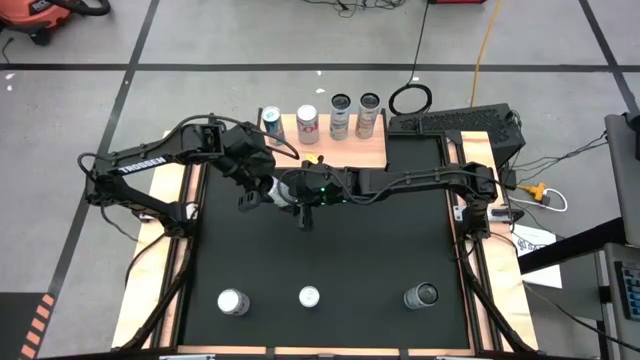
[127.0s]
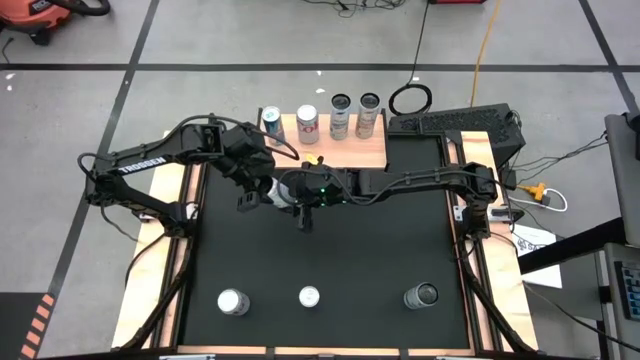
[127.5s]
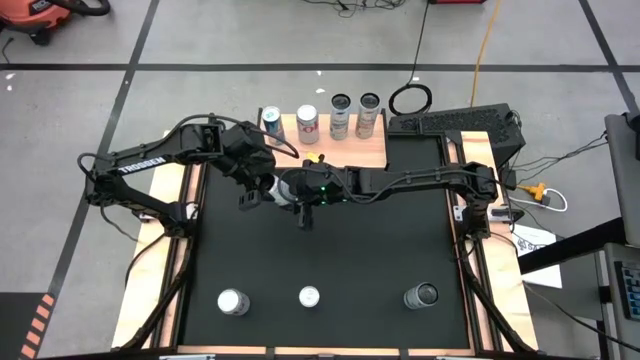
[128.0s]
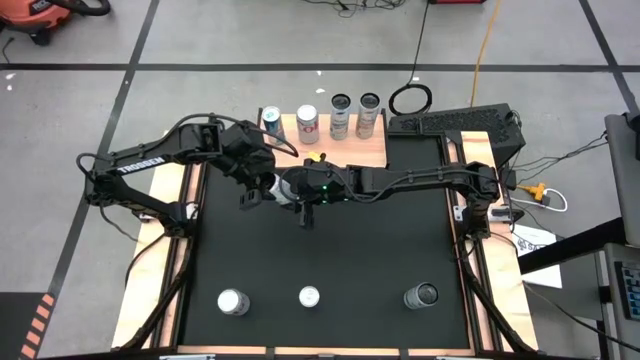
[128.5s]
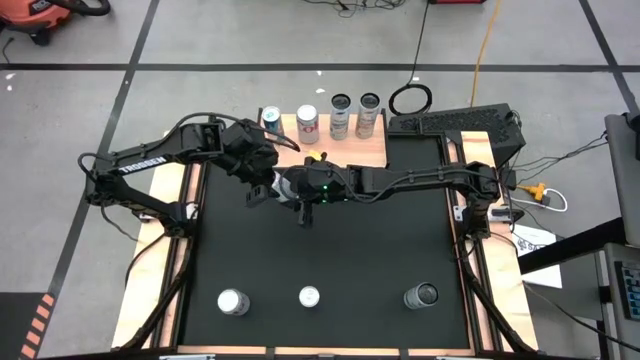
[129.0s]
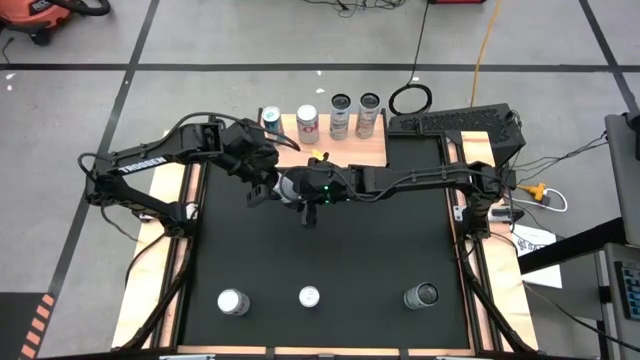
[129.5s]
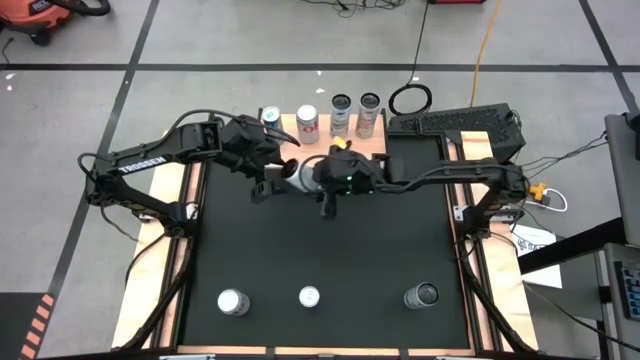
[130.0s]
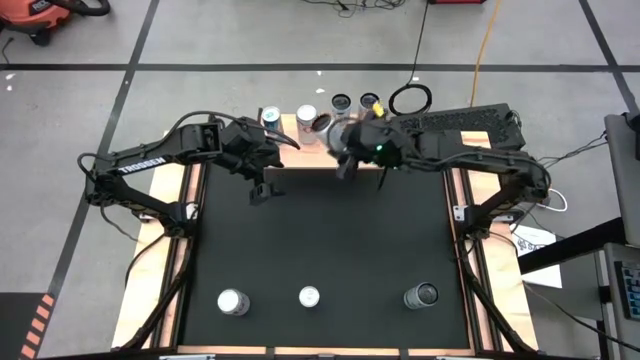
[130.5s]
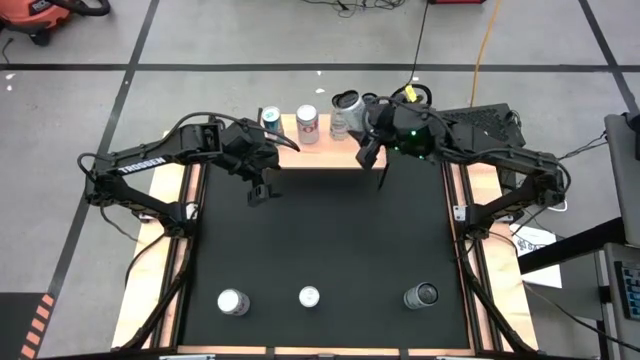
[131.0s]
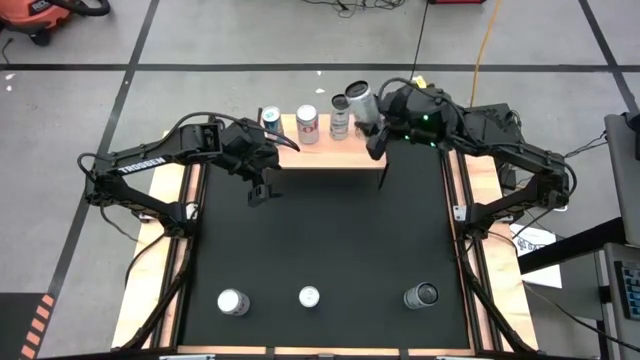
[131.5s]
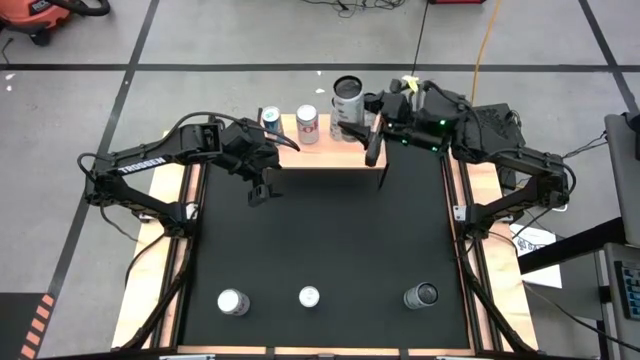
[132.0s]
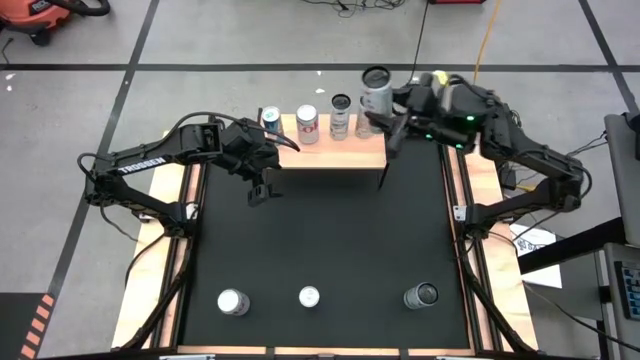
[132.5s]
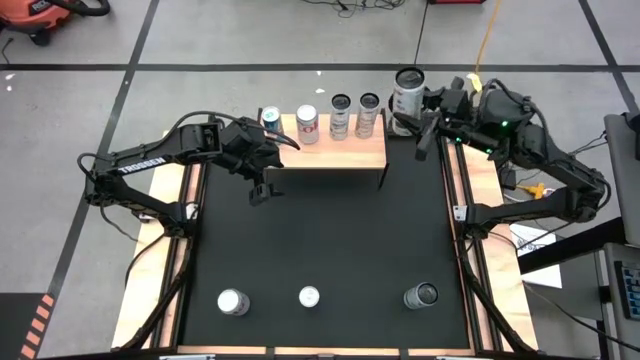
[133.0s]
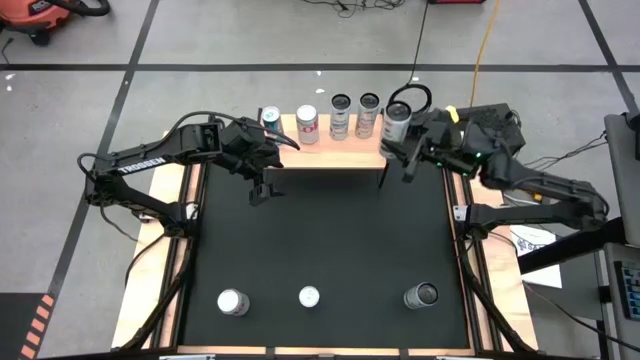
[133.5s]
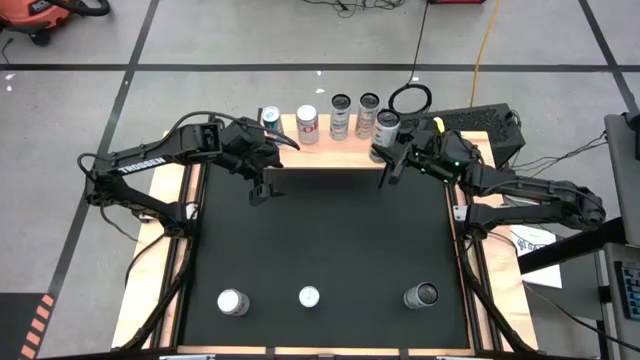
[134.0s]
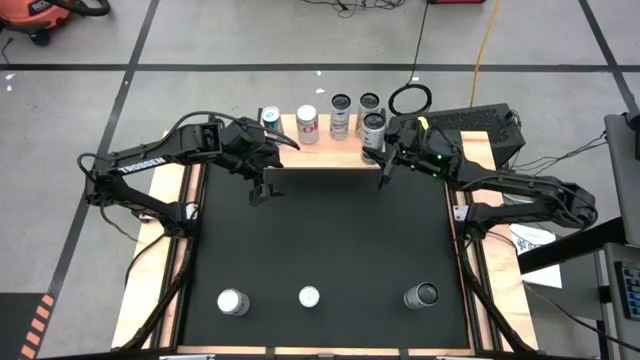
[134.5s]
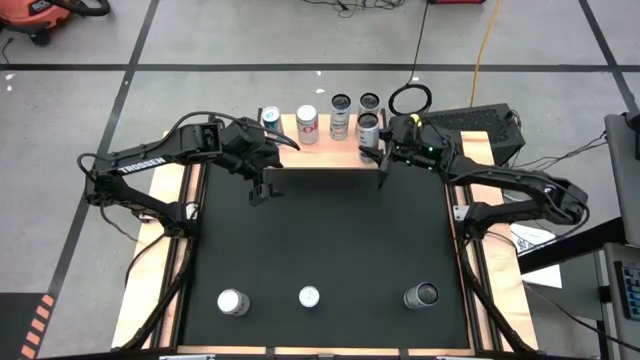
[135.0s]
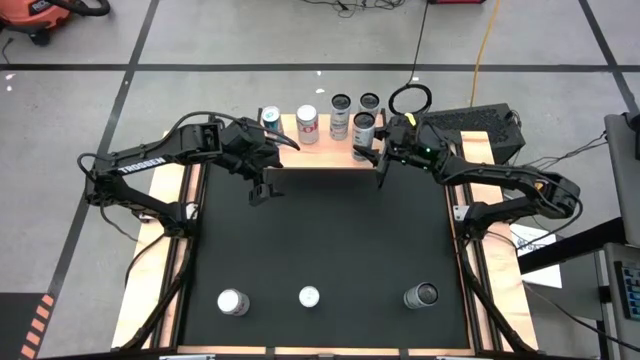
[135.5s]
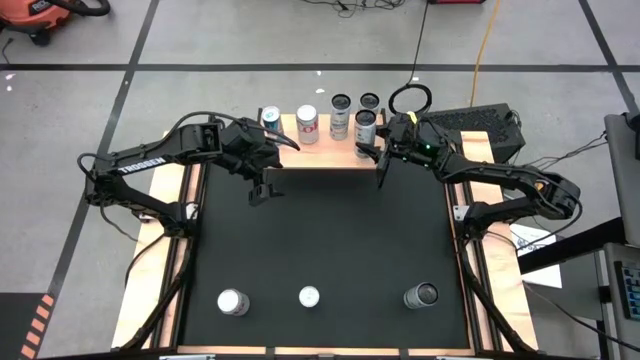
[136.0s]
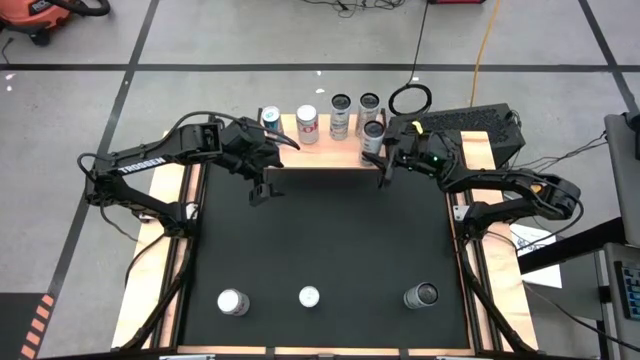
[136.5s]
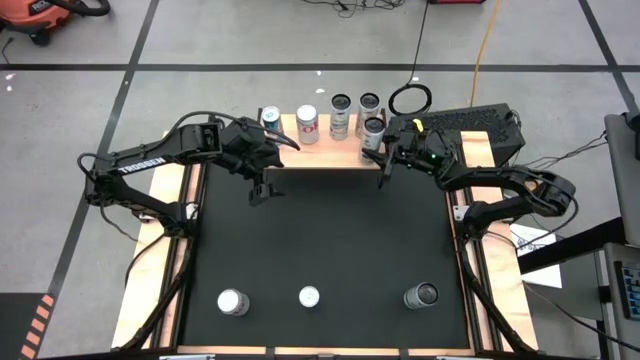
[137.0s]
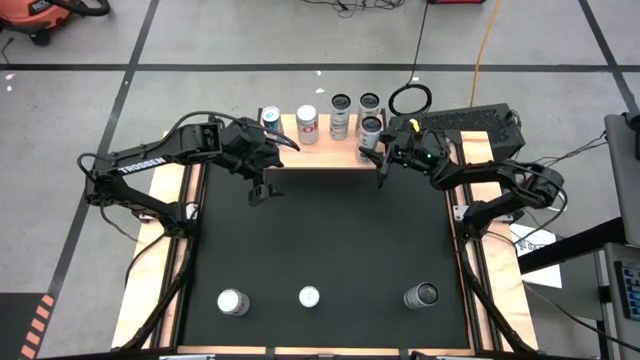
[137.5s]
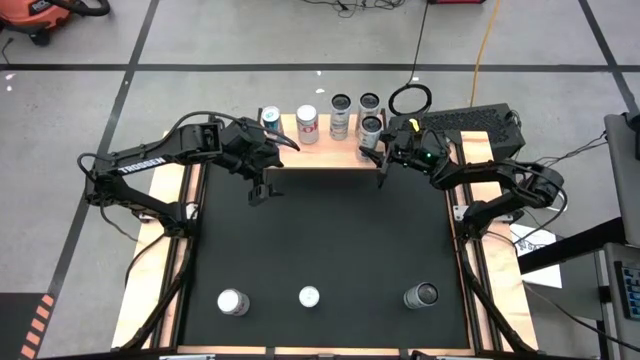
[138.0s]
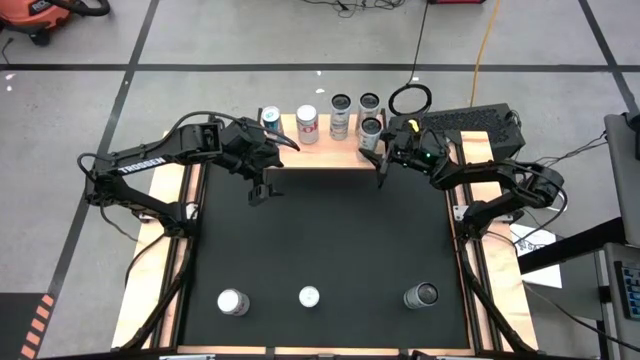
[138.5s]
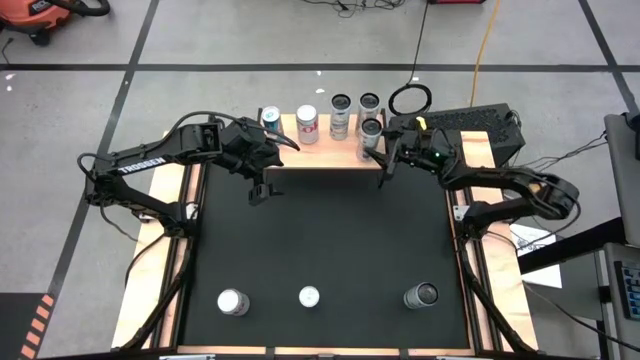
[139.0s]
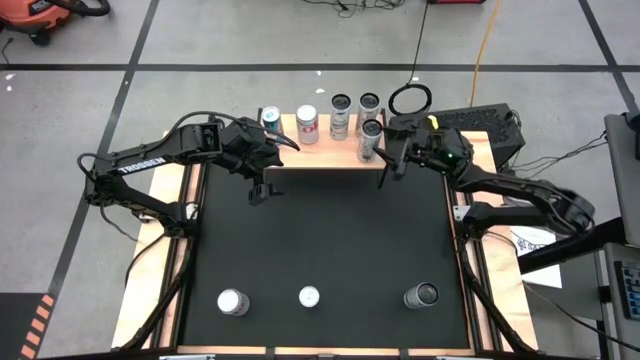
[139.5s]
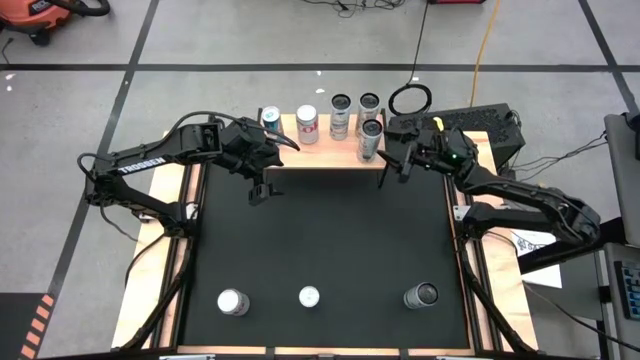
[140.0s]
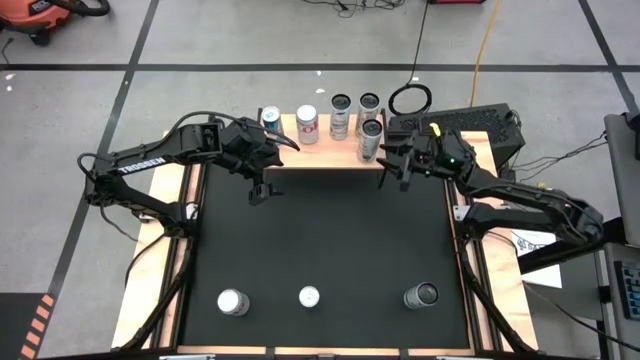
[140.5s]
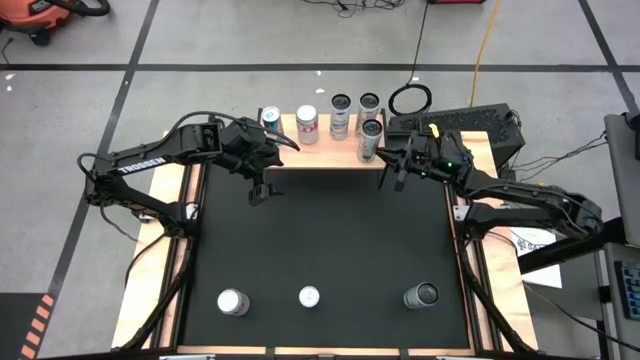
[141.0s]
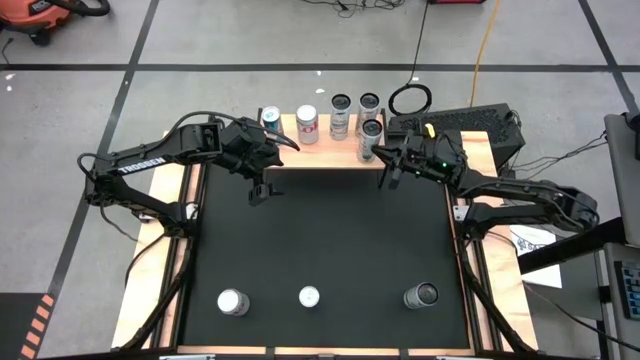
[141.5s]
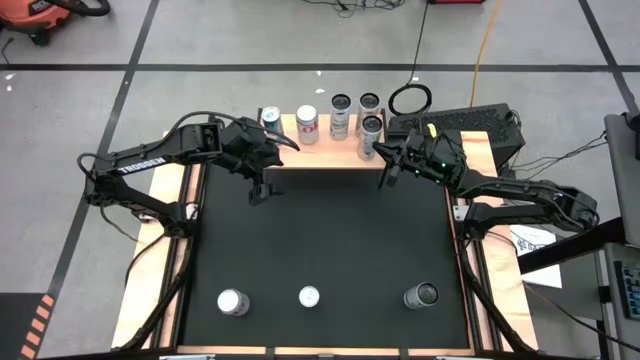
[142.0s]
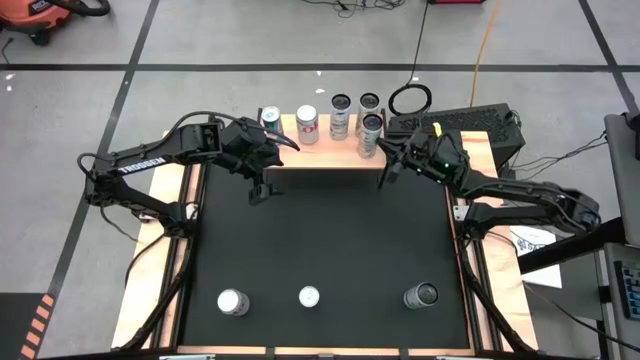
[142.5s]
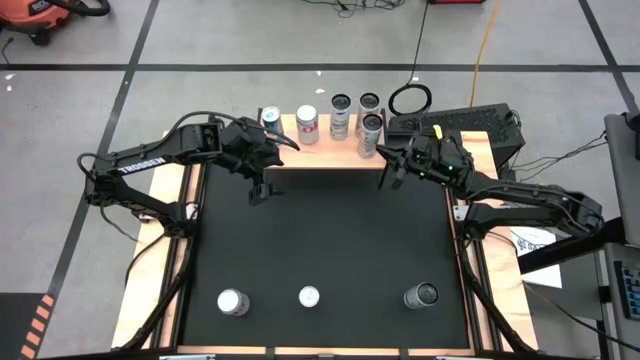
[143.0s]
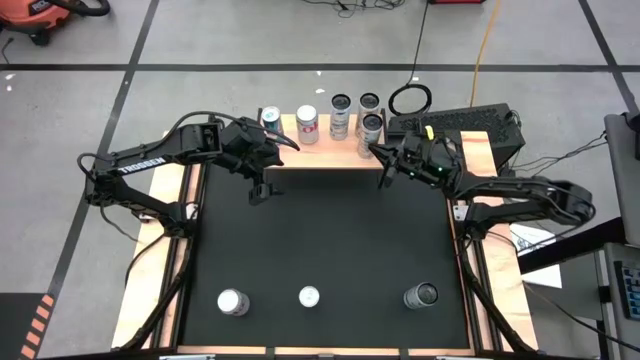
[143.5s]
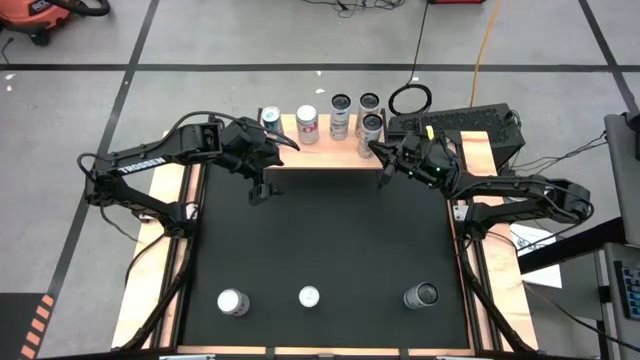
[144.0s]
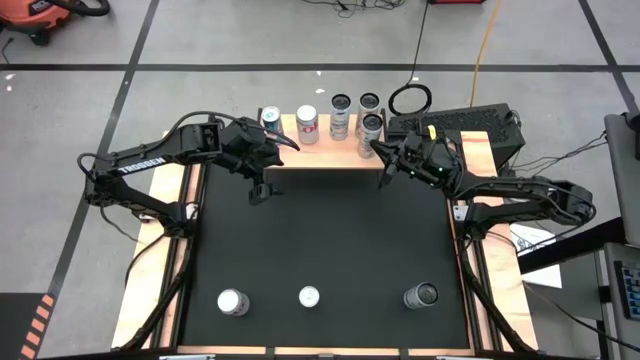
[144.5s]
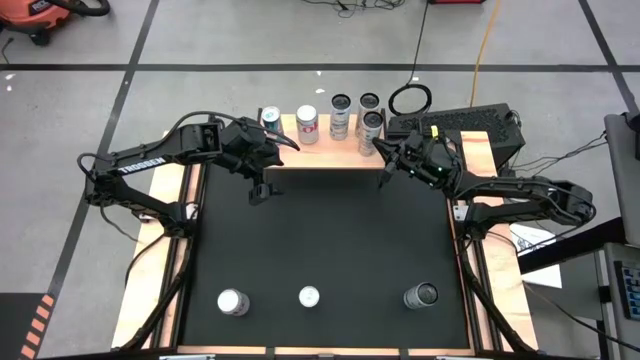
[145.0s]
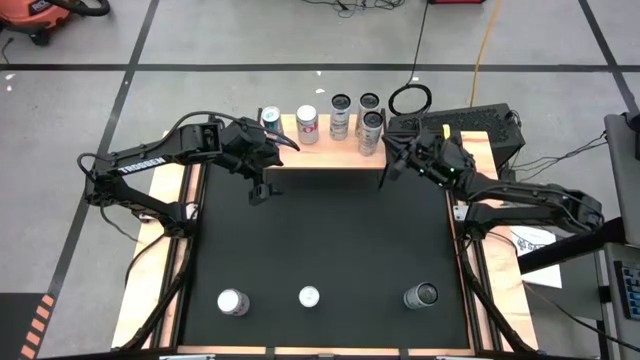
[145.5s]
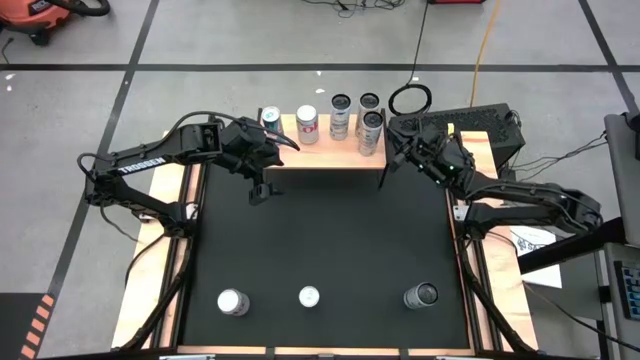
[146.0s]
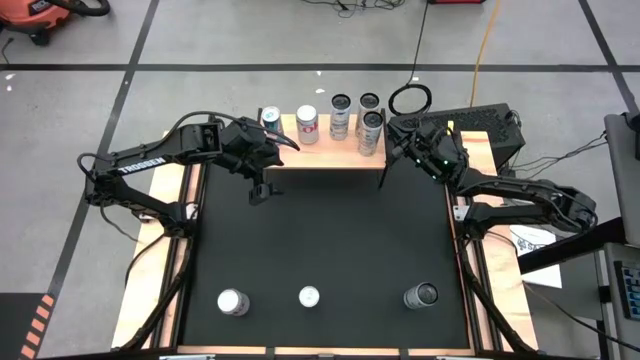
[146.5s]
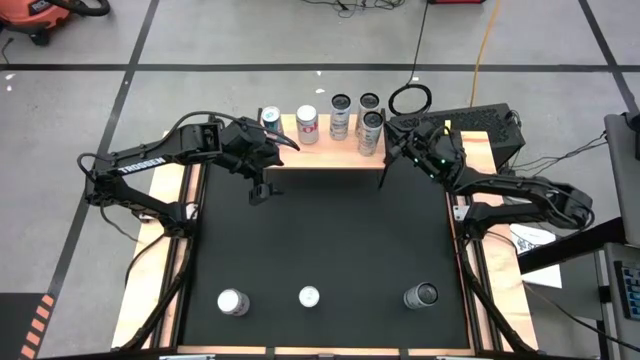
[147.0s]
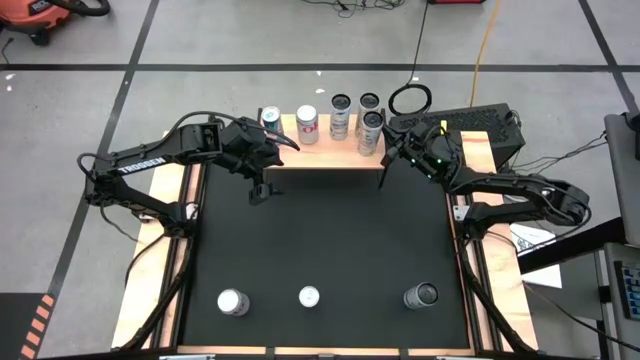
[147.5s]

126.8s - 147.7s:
Task: Place canned beverage on shelf
Put the white yellow soda can on the shelf aligned with the other white yellow soda can
